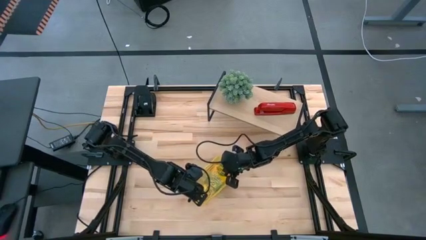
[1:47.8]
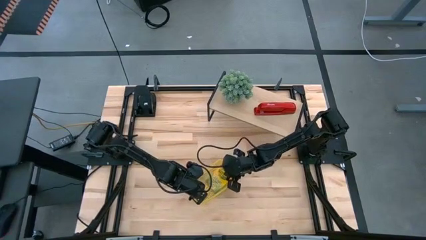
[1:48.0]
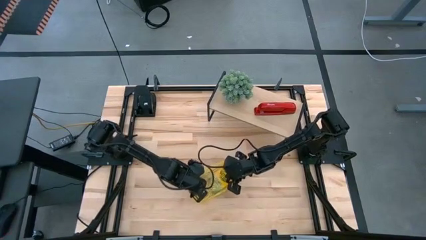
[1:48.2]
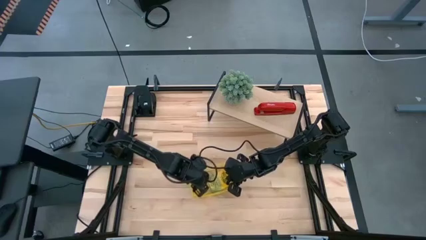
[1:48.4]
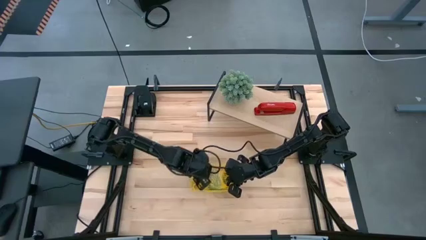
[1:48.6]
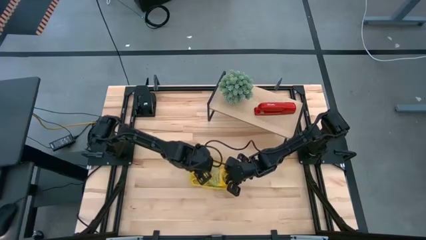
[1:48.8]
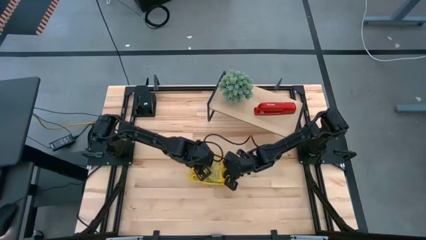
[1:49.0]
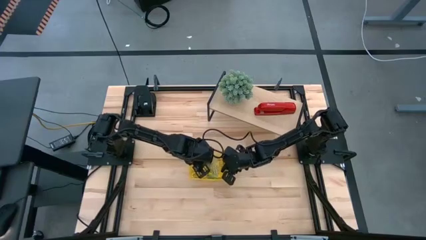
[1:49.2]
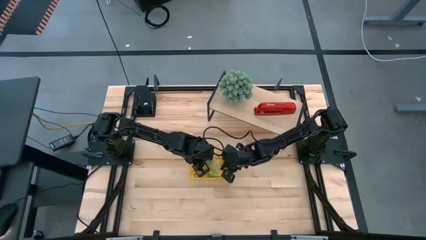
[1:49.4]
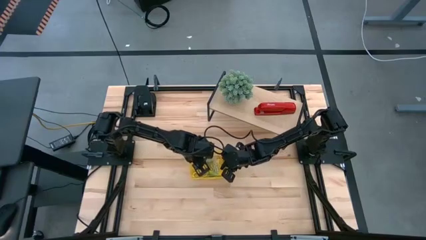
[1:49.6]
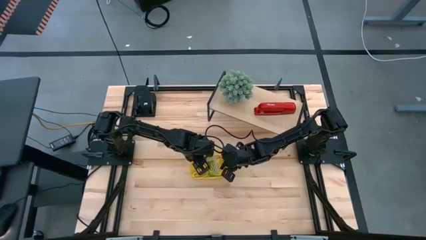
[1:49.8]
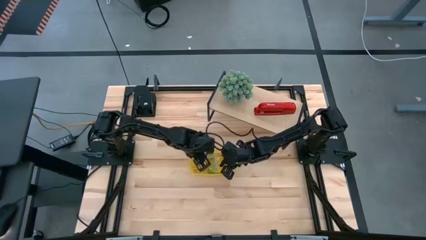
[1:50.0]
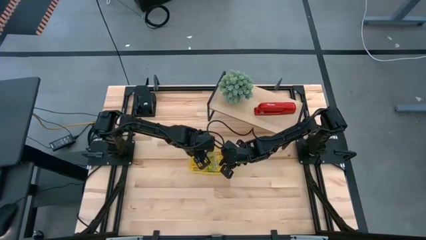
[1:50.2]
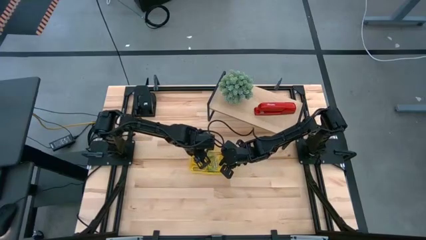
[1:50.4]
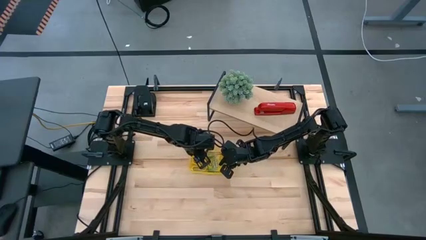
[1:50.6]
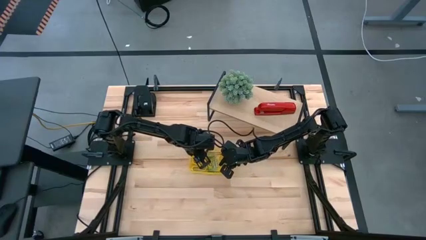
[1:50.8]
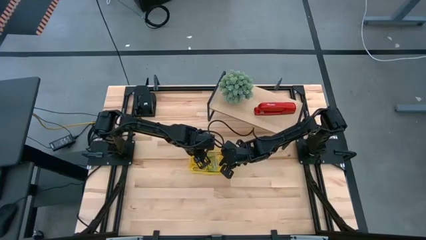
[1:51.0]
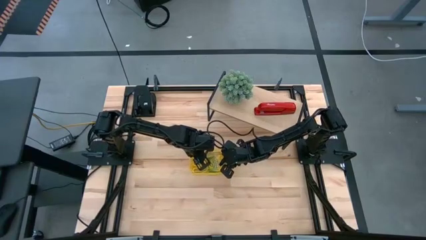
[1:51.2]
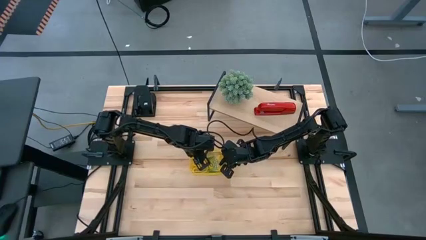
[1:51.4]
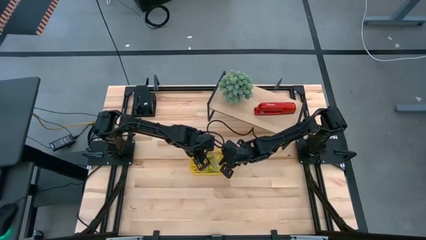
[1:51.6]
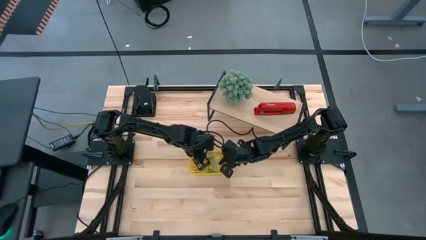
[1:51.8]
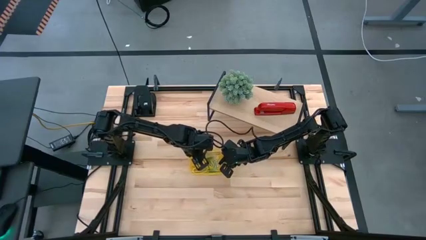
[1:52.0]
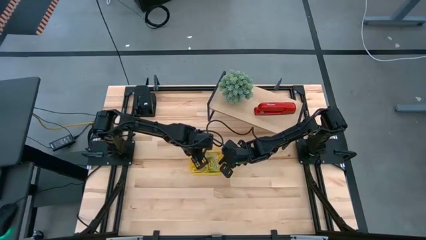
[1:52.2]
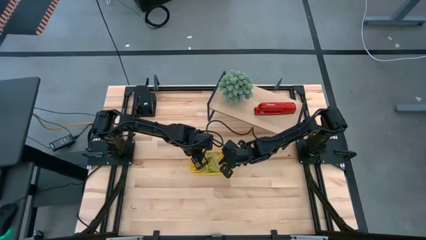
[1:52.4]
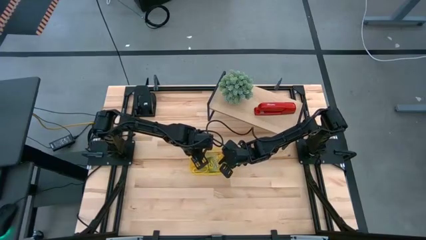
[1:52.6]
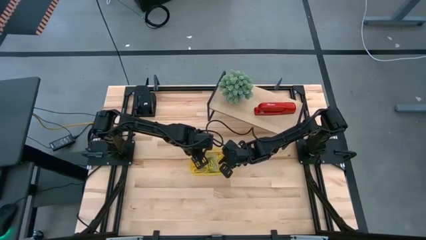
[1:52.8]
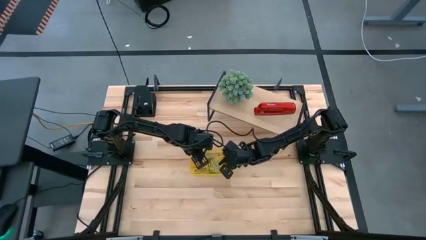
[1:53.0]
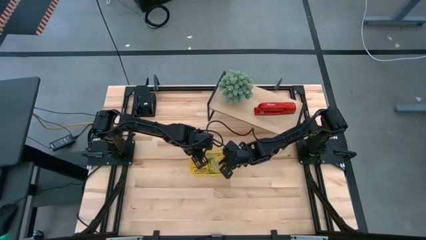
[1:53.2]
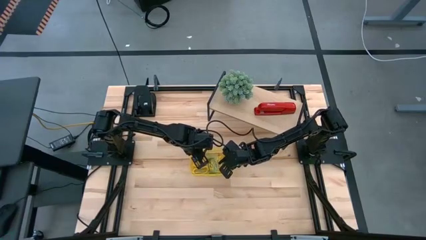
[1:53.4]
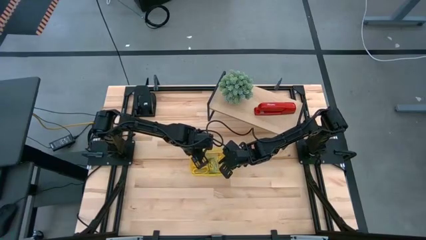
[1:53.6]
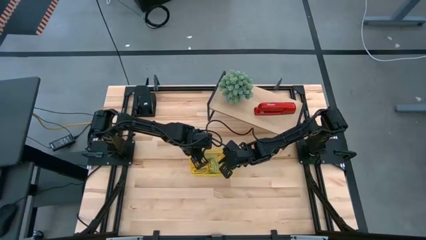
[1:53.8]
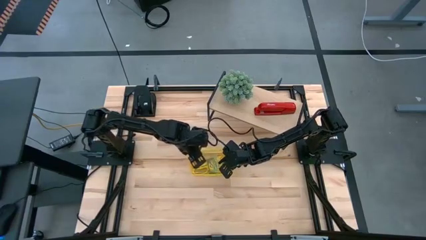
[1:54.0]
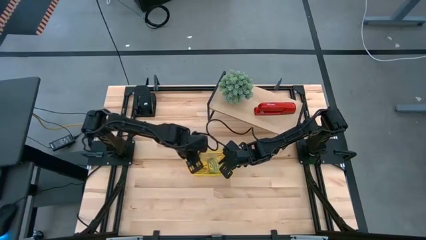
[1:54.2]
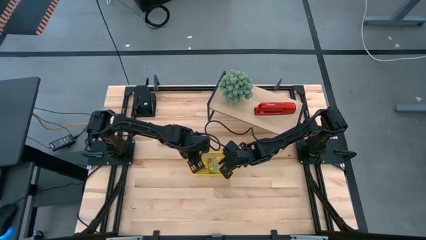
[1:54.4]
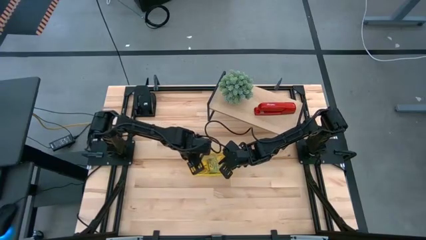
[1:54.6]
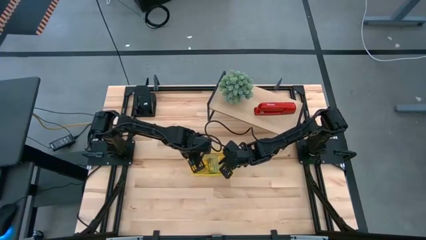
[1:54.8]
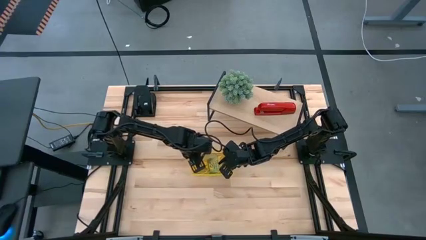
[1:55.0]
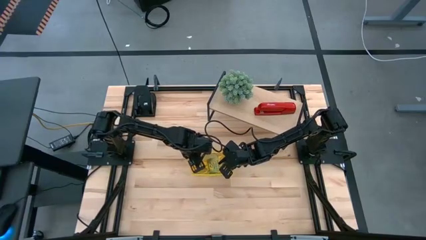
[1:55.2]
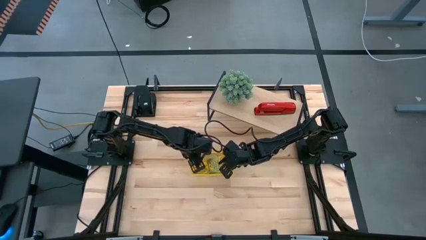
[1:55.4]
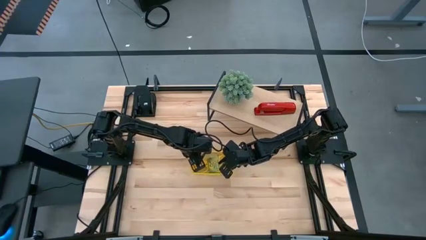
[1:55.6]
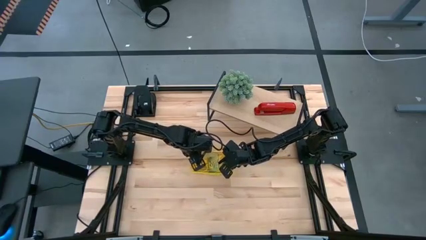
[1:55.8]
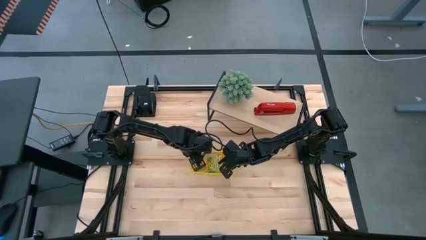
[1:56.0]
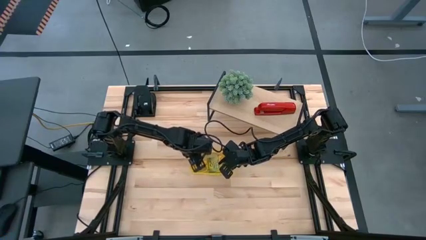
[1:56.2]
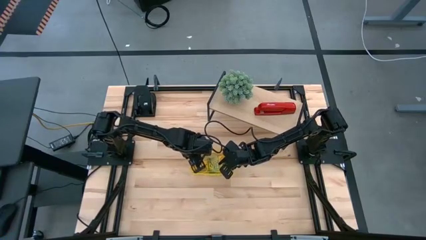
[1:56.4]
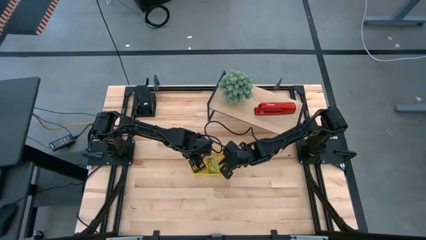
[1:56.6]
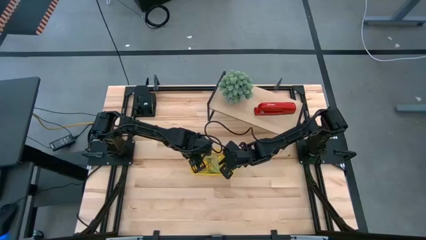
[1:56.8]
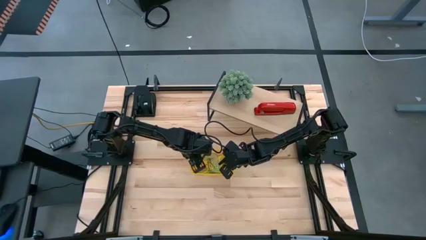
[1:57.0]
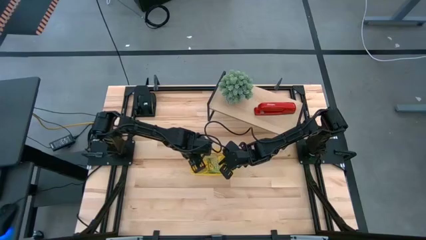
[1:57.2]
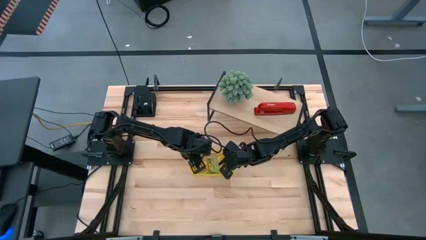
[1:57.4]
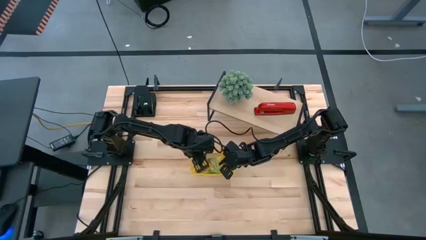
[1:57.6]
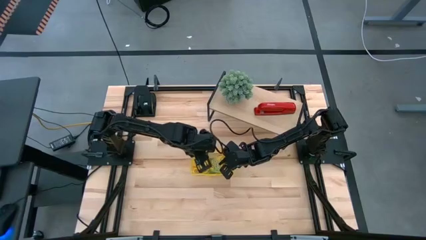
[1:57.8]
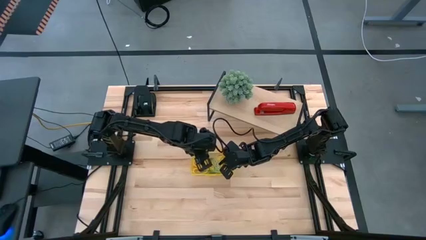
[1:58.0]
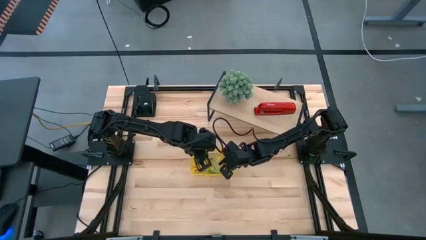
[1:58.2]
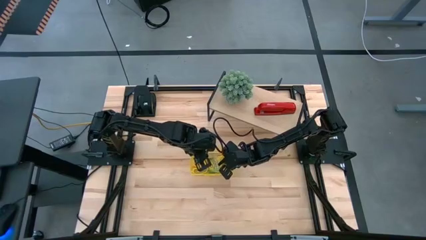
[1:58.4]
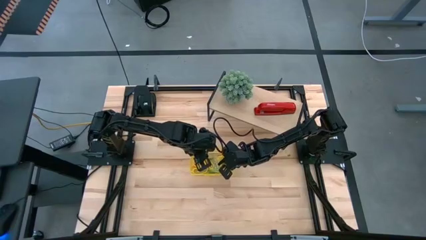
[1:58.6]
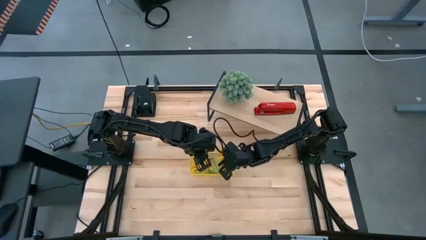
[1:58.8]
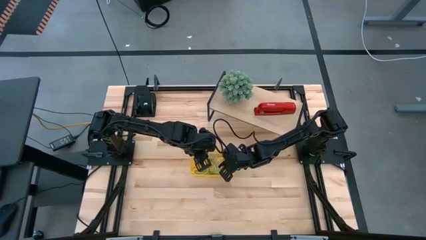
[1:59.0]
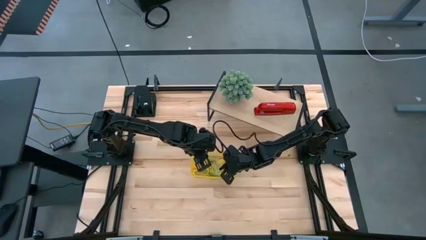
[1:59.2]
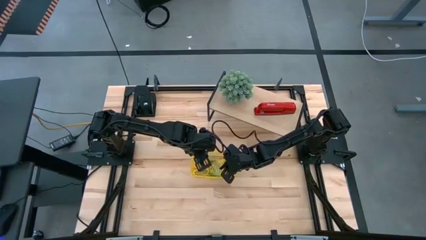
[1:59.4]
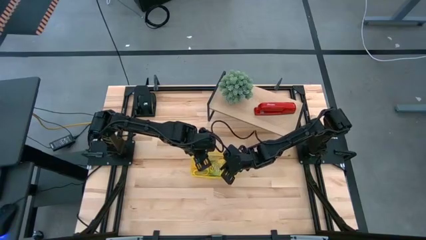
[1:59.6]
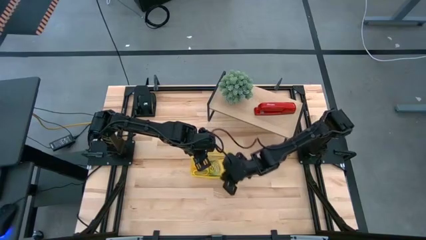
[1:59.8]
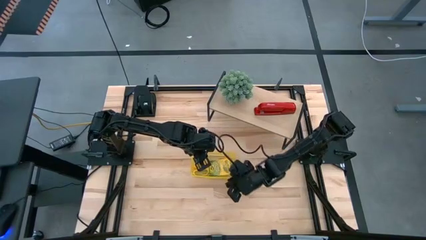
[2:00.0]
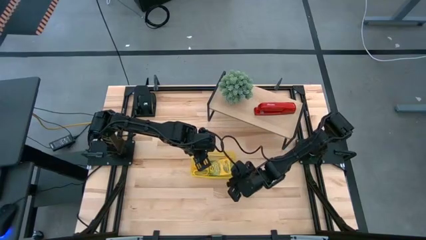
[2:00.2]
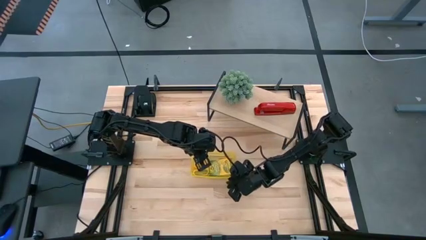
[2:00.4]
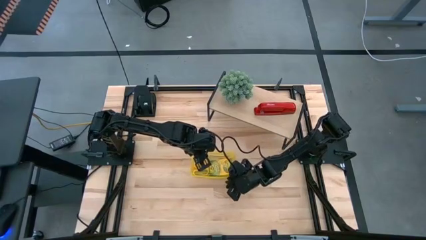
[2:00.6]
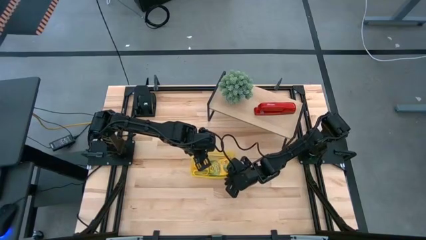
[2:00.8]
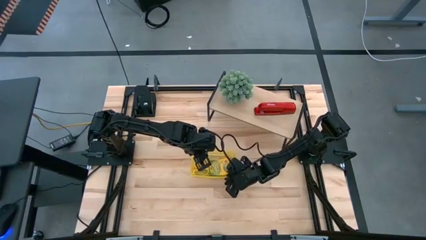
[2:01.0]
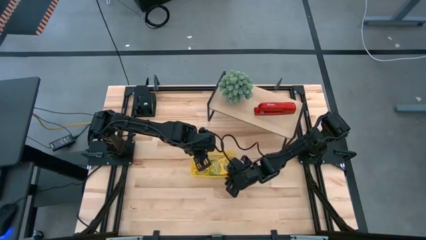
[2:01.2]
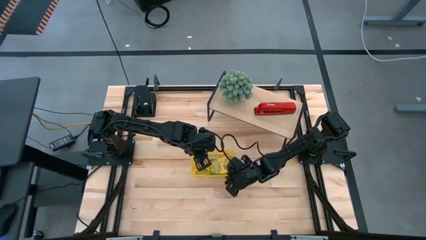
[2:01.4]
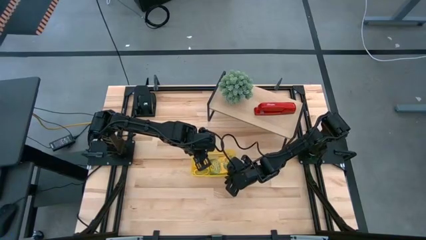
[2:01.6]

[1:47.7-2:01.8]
Task: Pack school essentials
Close the supply box
